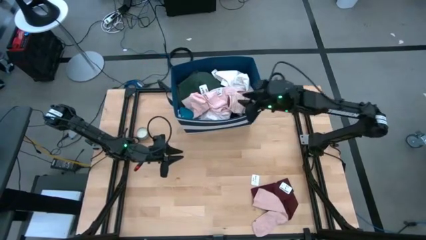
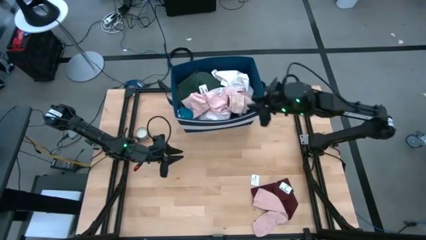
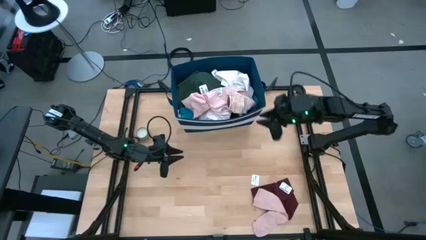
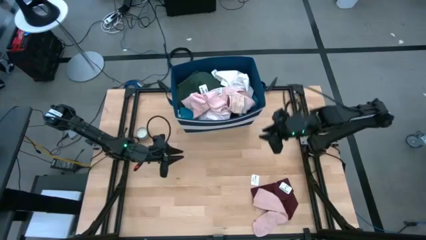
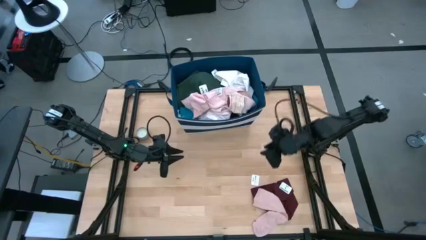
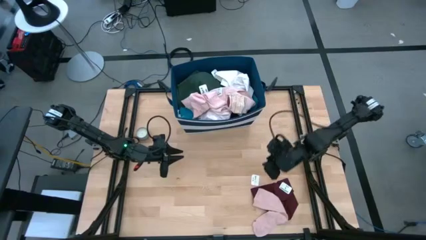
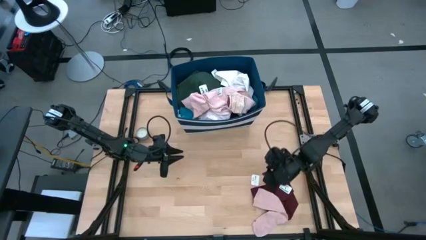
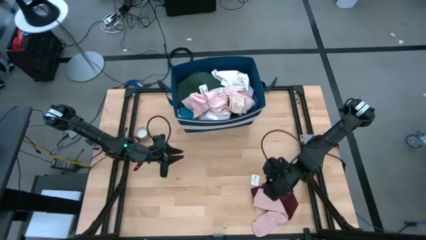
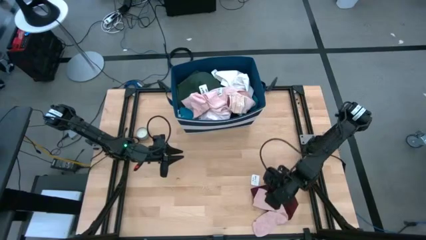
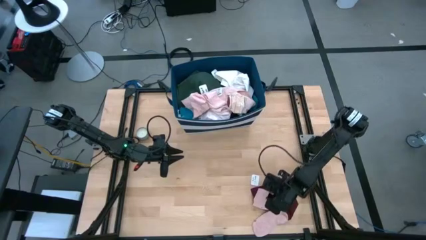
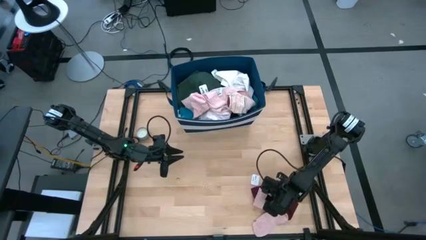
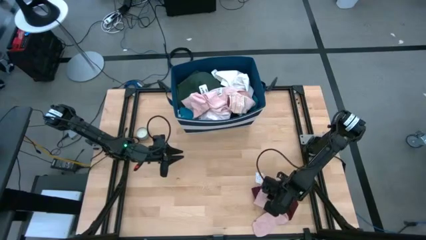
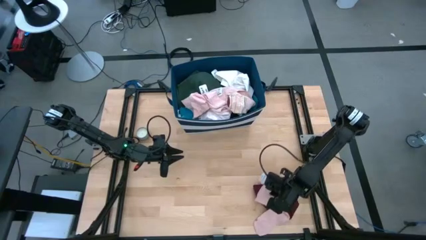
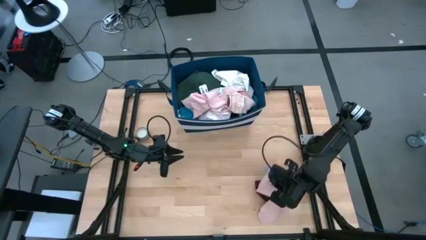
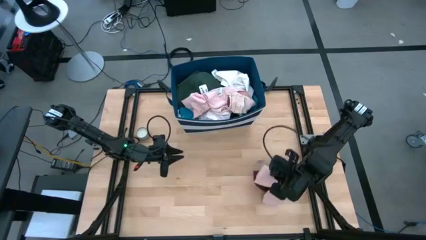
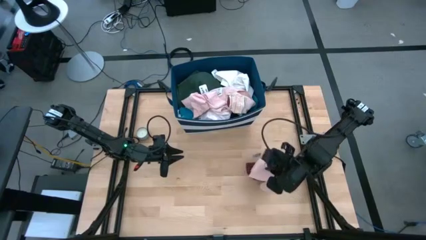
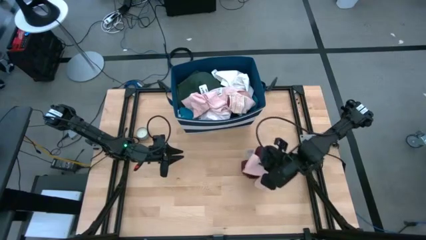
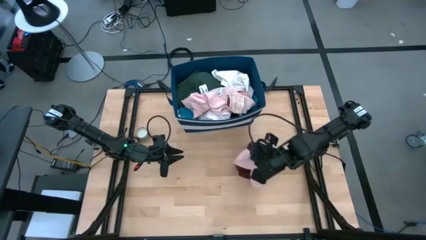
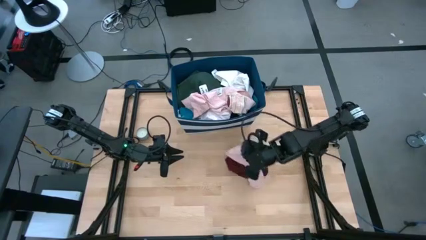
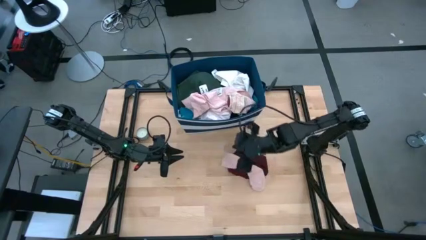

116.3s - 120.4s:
Task: Sort clothes
Put the pink sock into the blue laundry bin

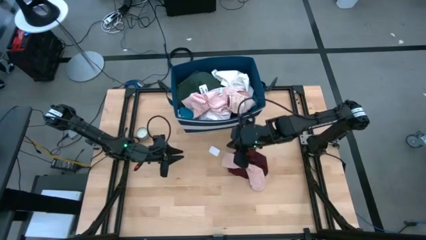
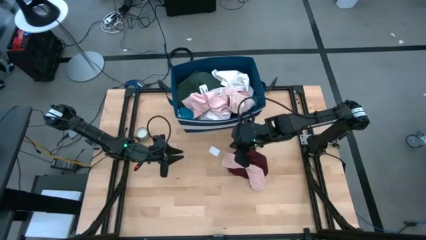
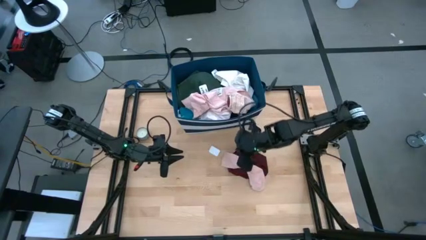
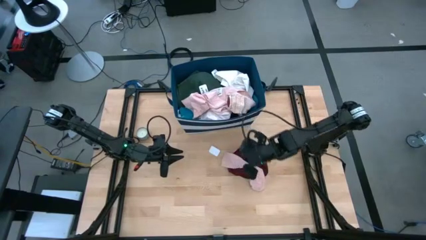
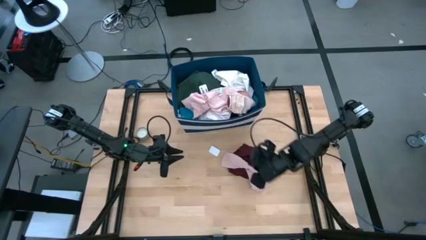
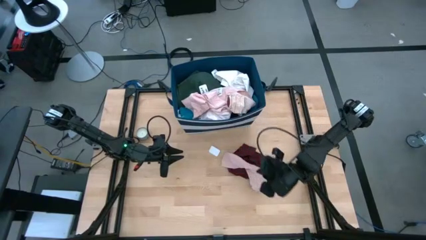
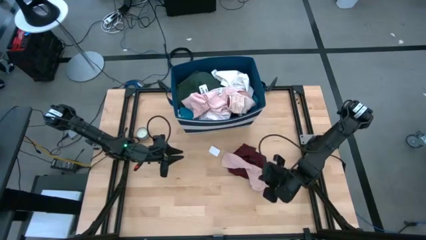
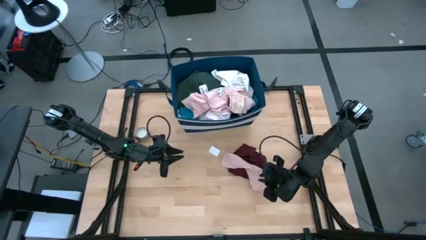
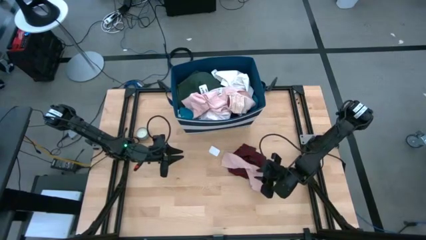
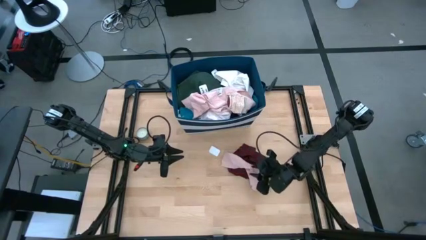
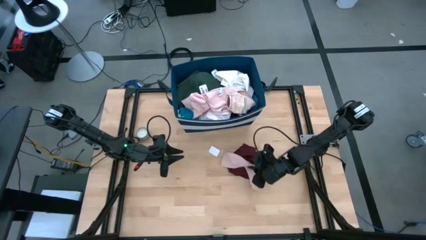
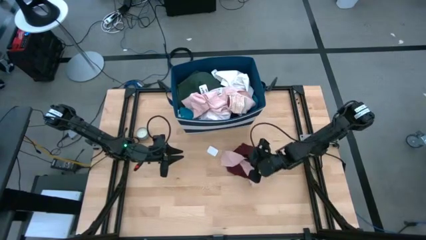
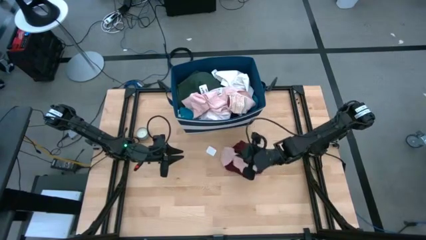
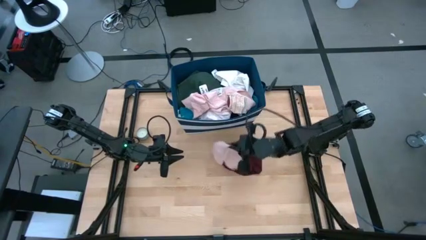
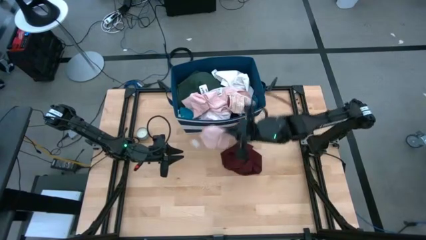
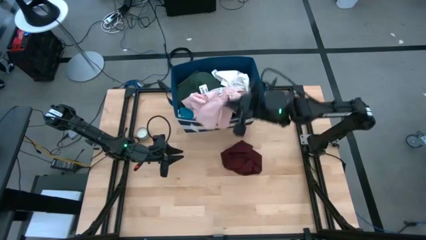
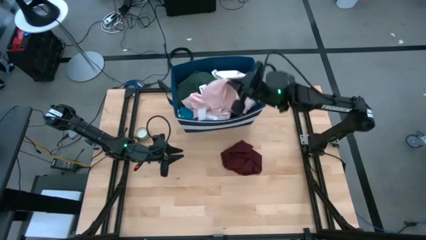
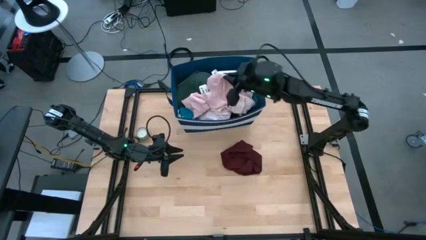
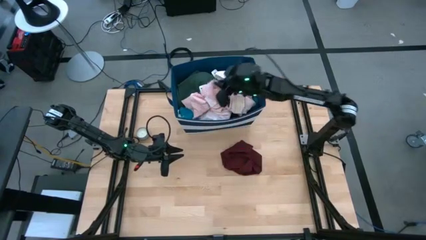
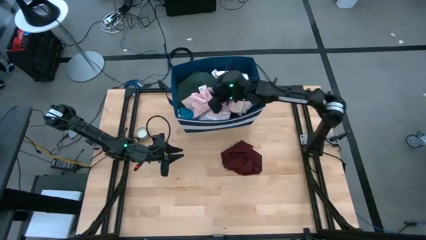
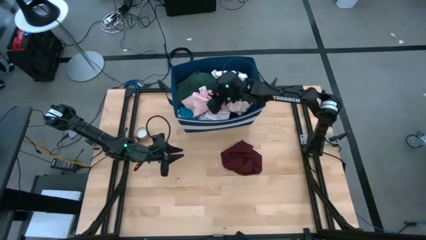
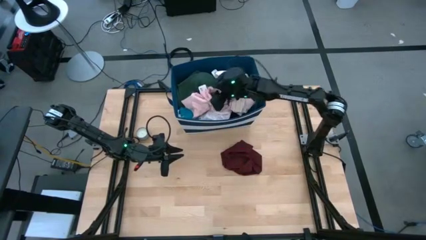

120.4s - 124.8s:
Put the pink sock into the blue laundry bin

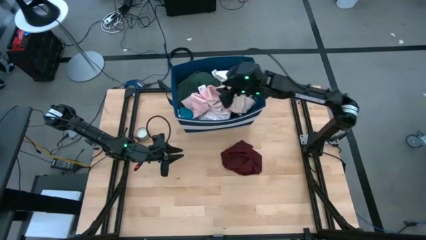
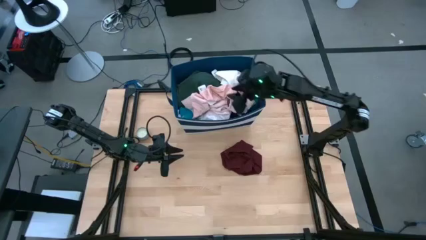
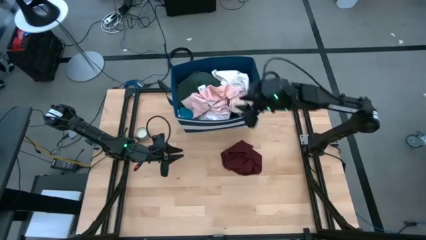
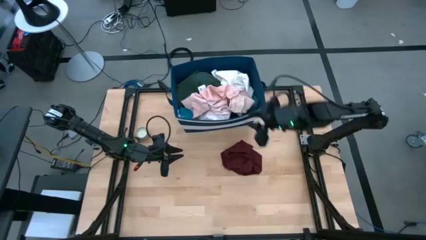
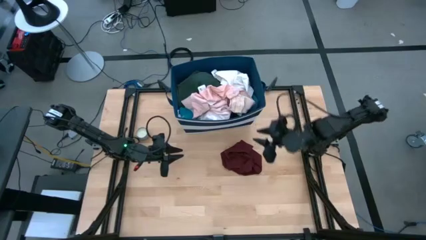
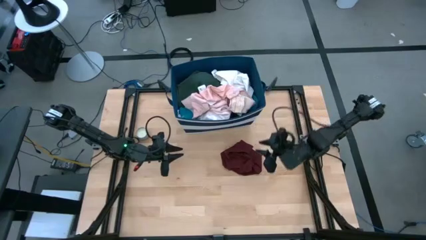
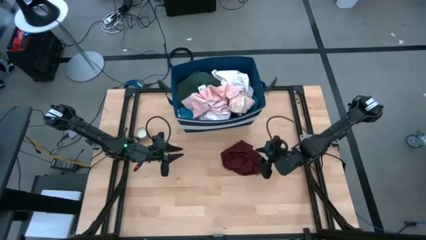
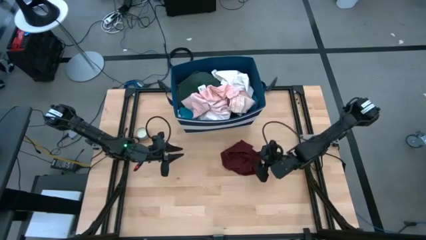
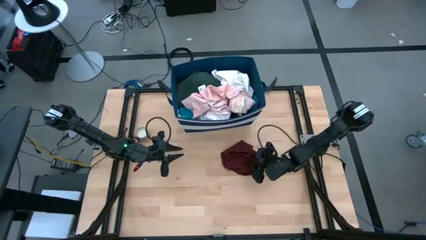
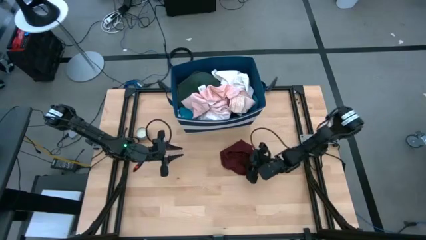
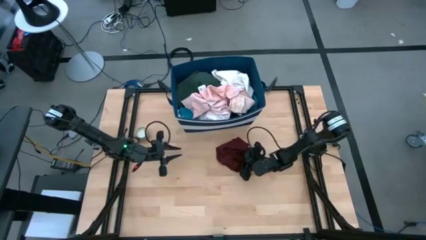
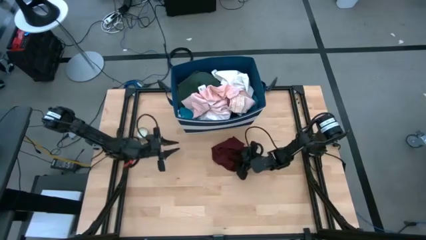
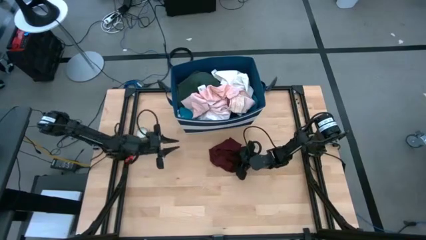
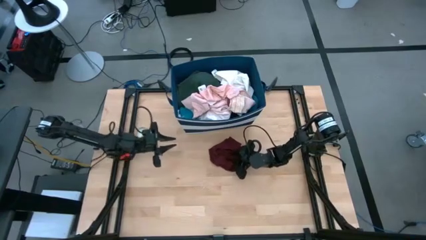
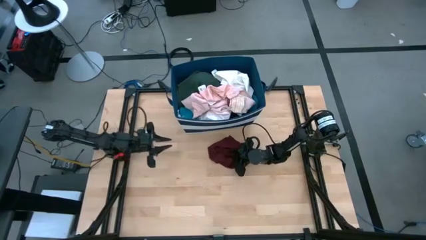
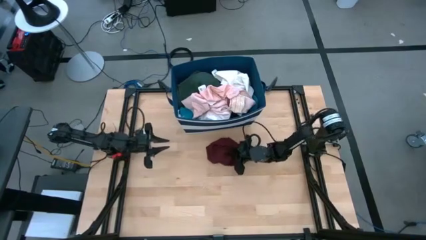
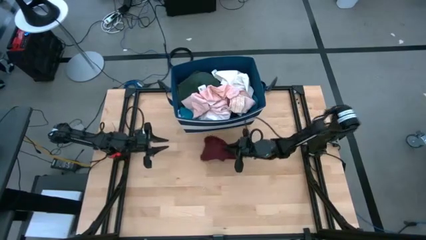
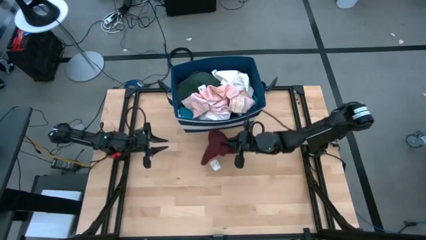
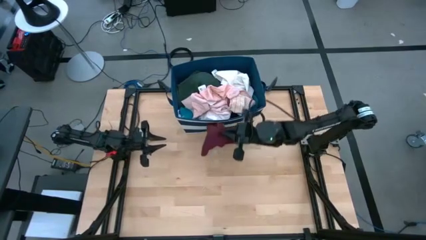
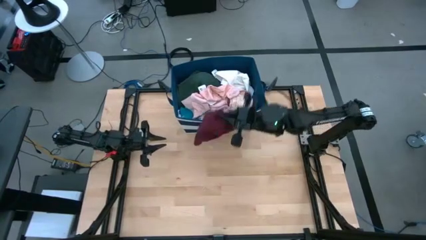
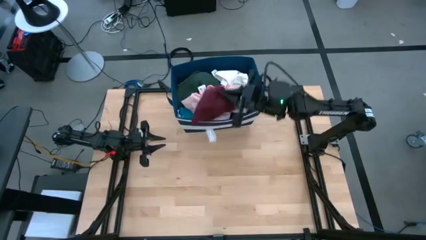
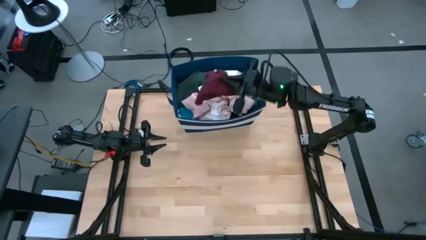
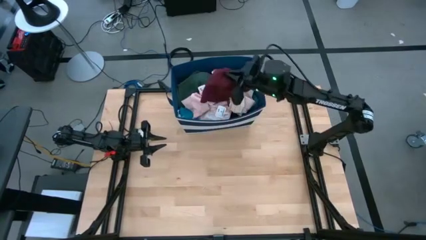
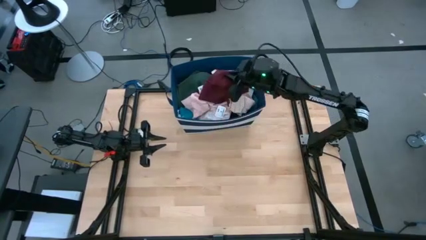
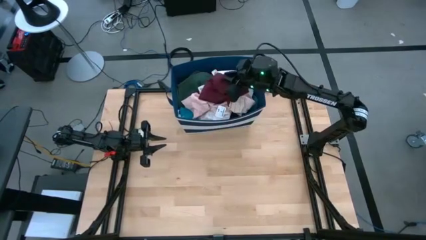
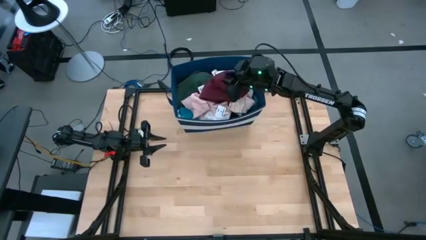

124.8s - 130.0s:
Put the red underwear into the blue laundry bin
